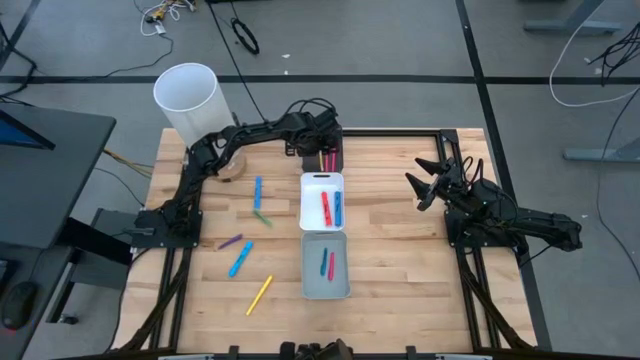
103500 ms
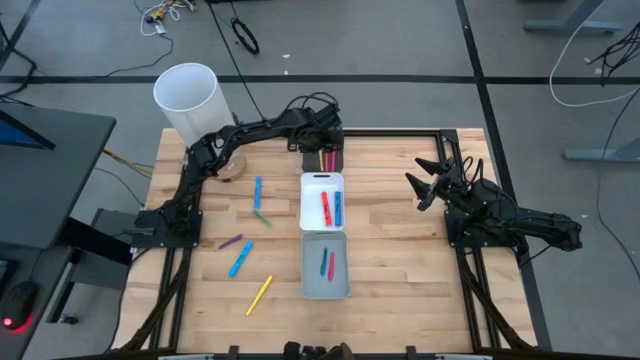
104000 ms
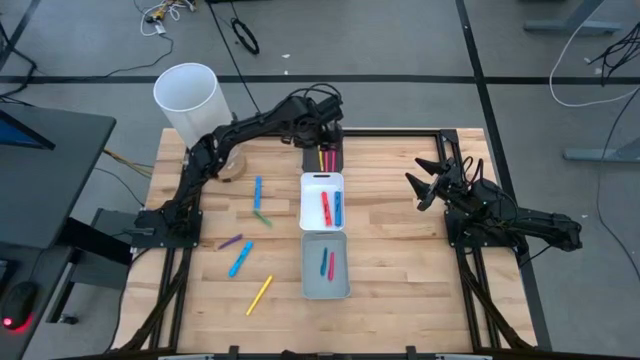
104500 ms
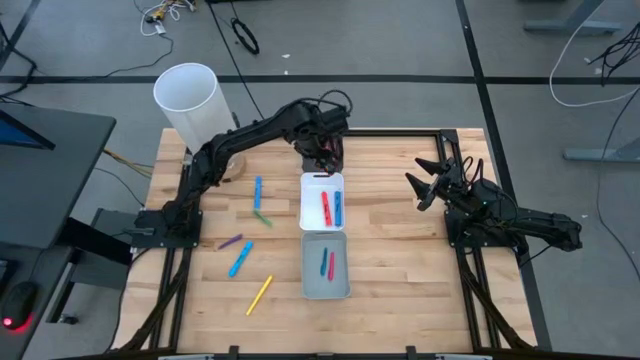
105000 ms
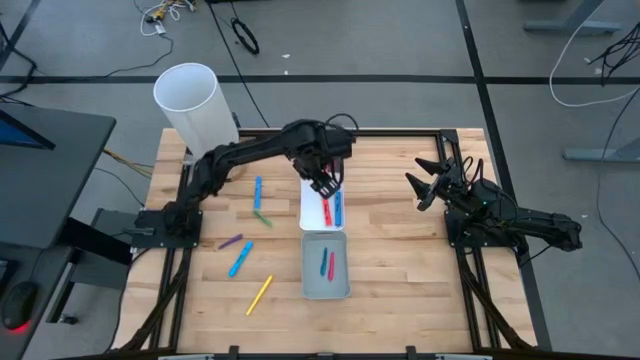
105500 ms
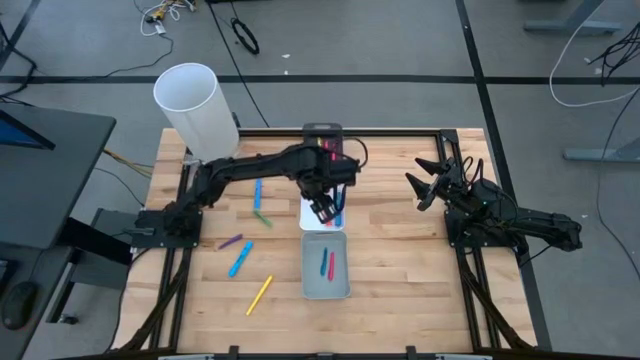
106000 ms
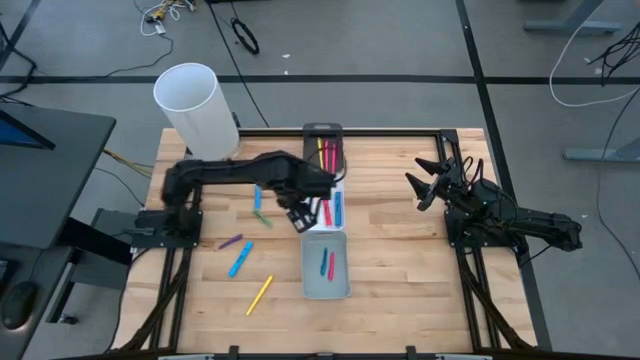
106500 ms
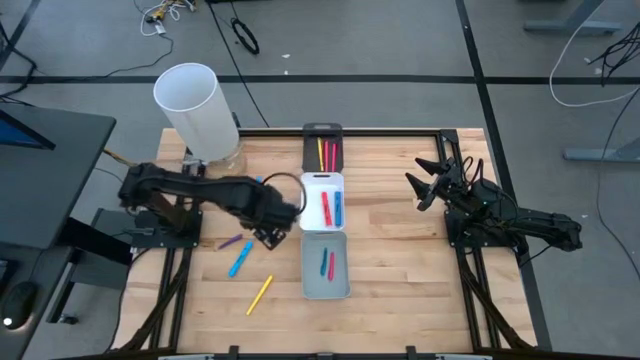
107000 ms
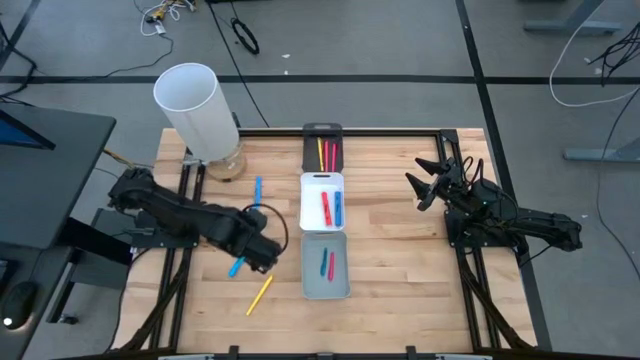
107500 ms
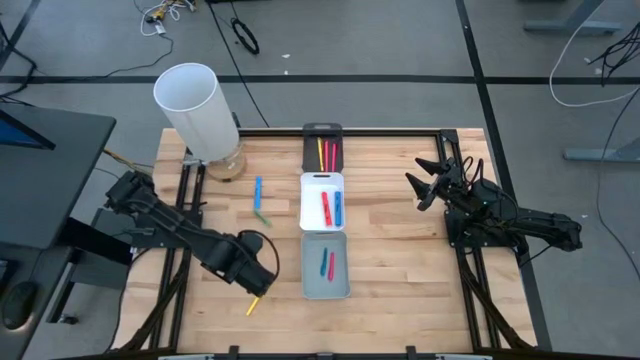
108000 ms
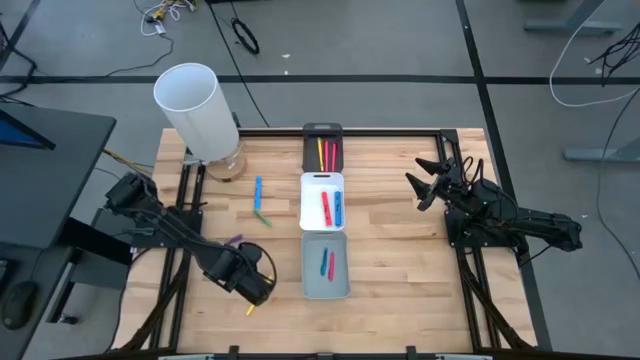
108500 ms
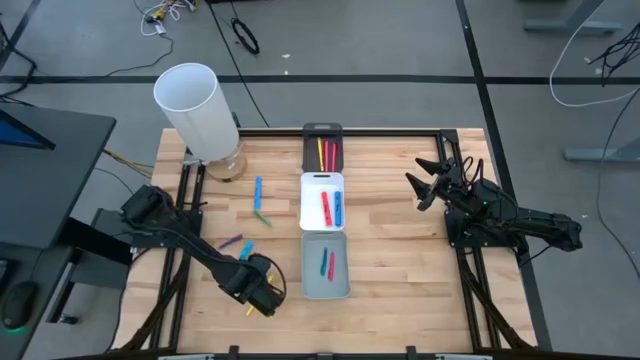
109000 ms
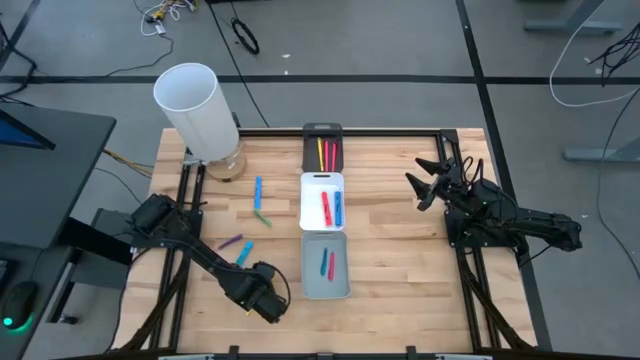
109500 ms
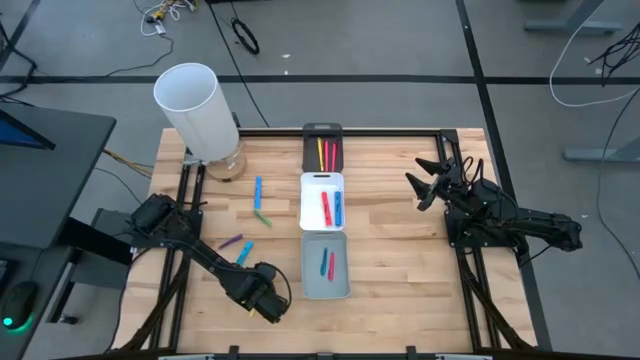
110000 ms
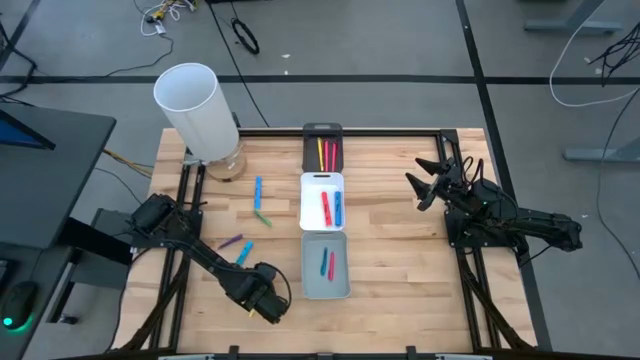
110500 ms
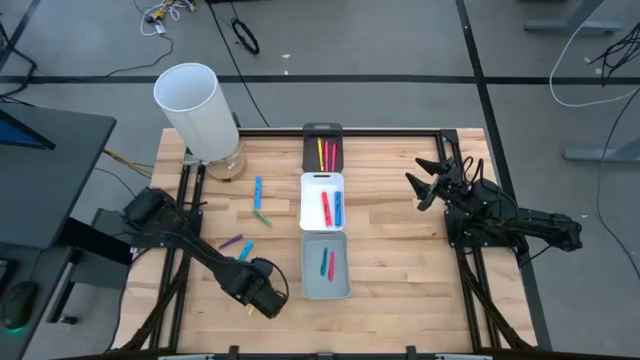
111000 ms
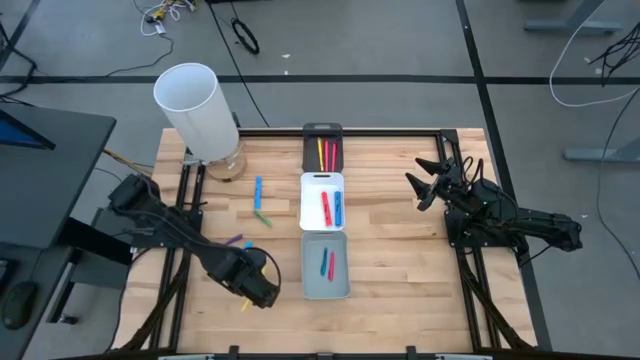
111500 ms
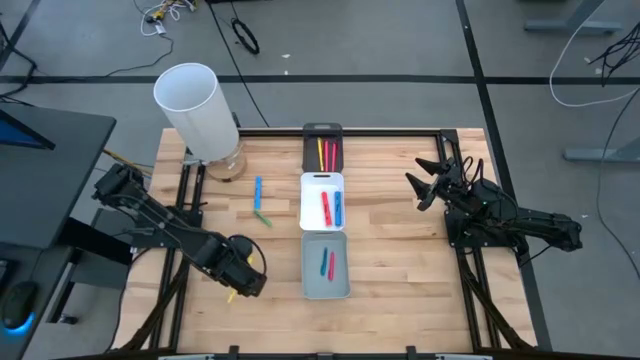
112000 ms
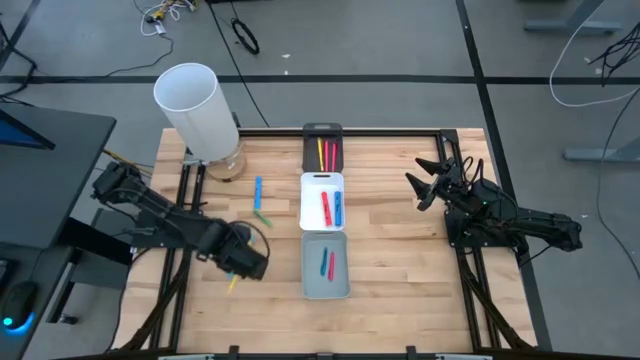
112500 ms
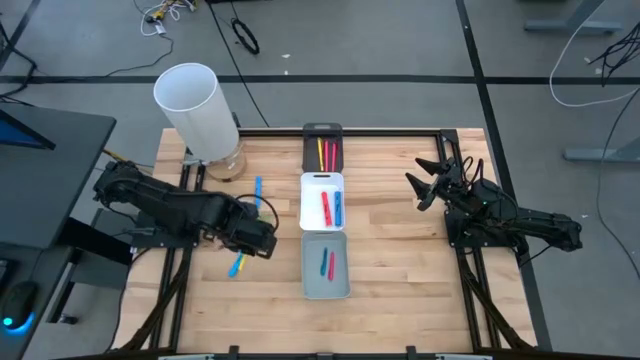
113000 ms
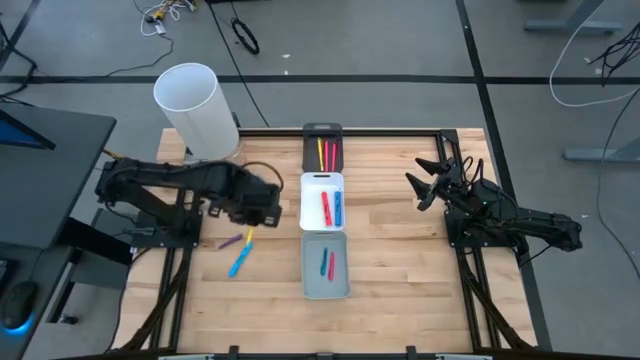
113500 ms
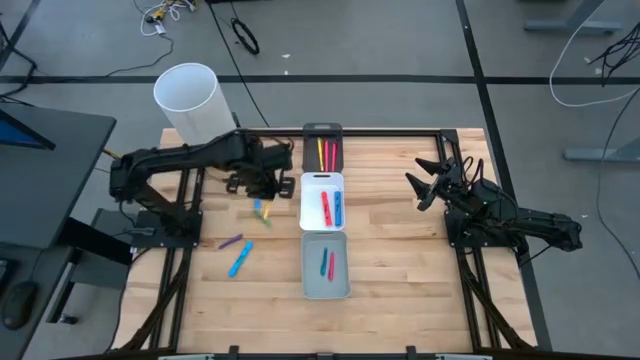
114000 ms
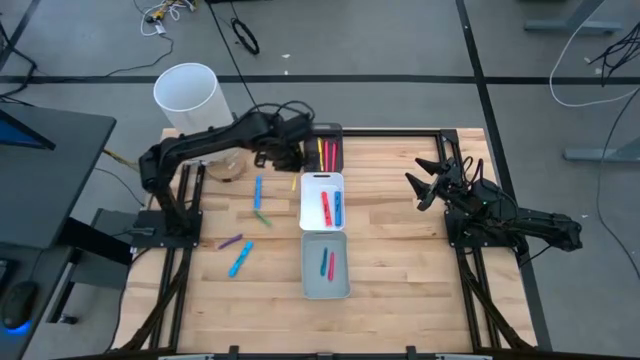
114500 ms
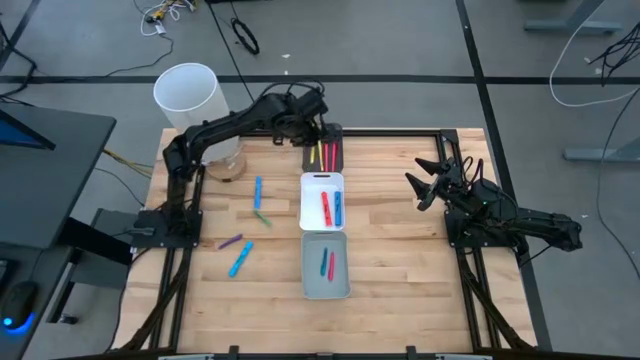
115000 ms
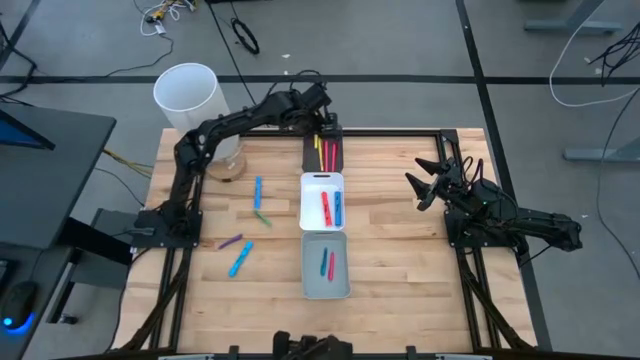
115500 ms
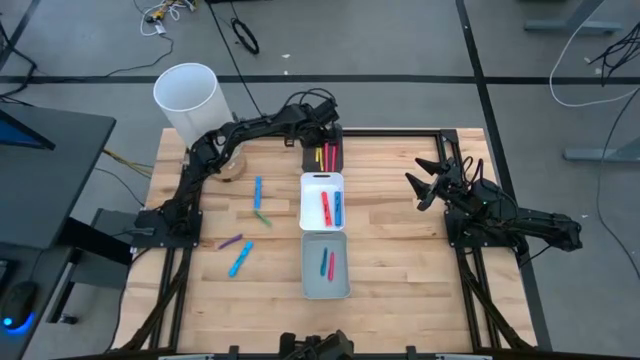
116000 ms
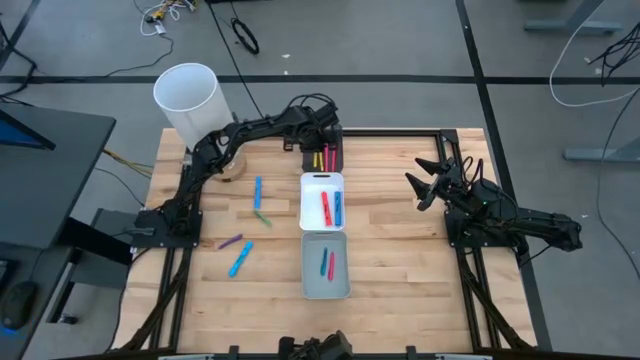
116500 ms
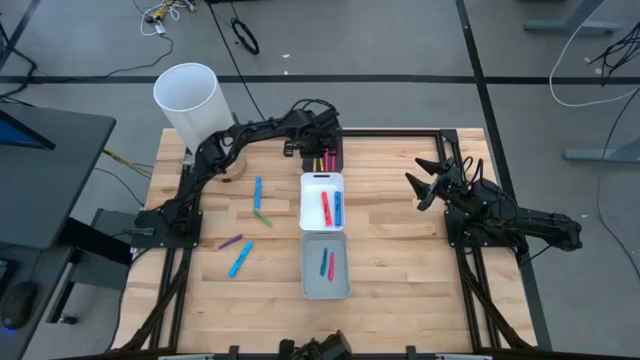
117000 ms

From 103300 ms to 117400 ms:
Task: Pick & Place Markers
Put the yellow pen into the black bin

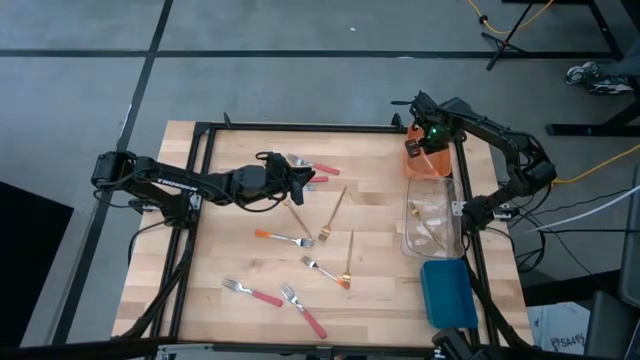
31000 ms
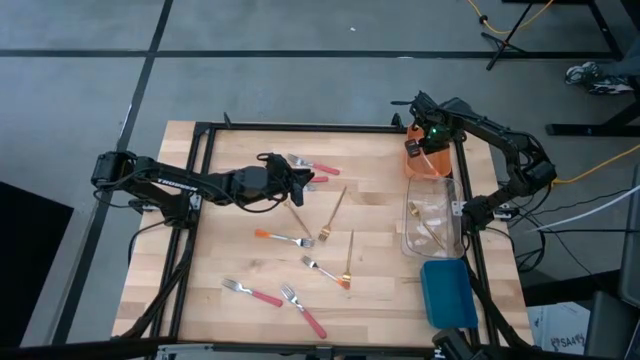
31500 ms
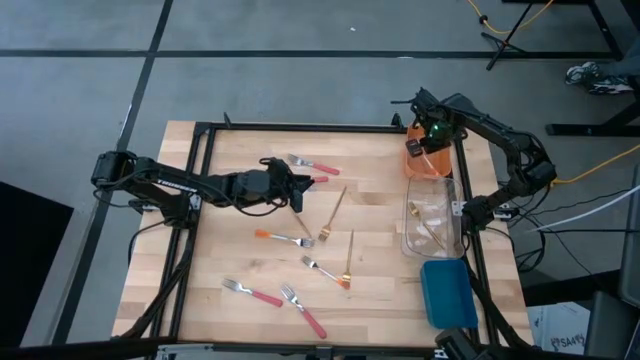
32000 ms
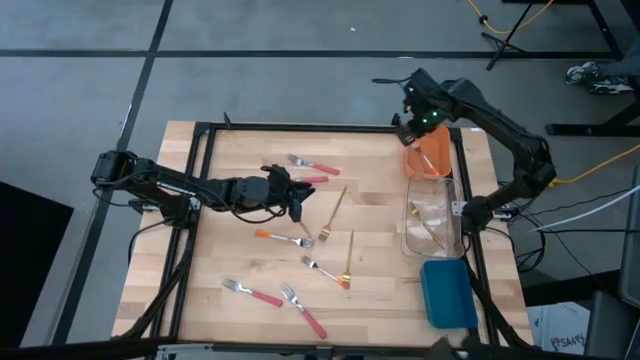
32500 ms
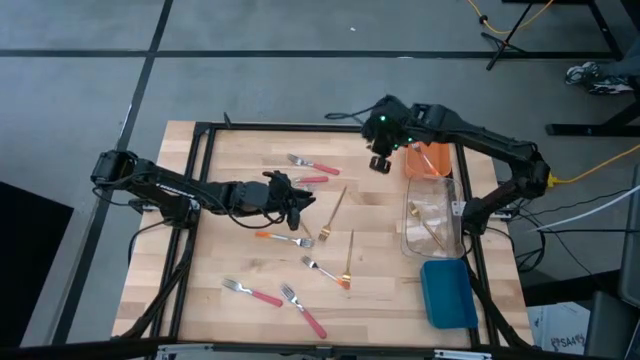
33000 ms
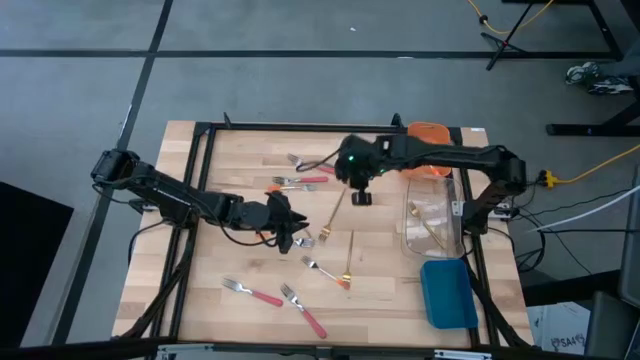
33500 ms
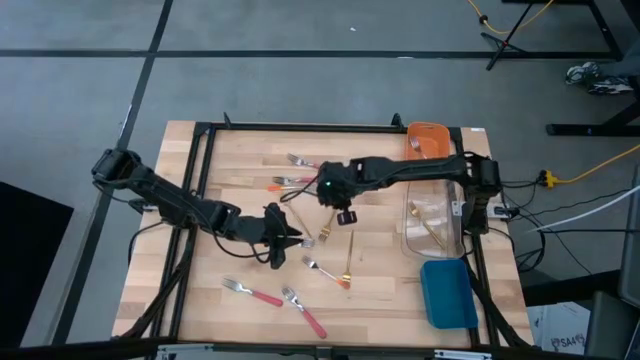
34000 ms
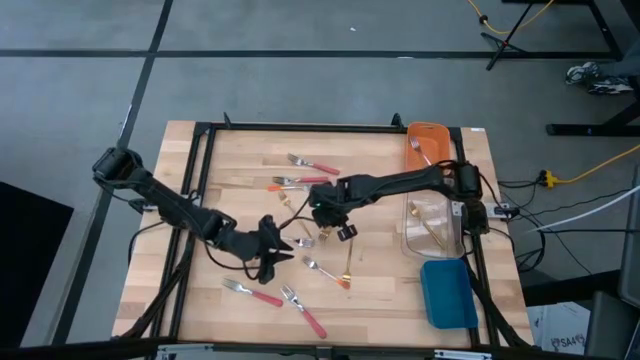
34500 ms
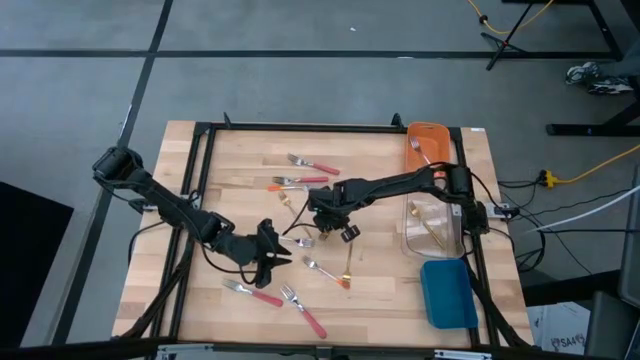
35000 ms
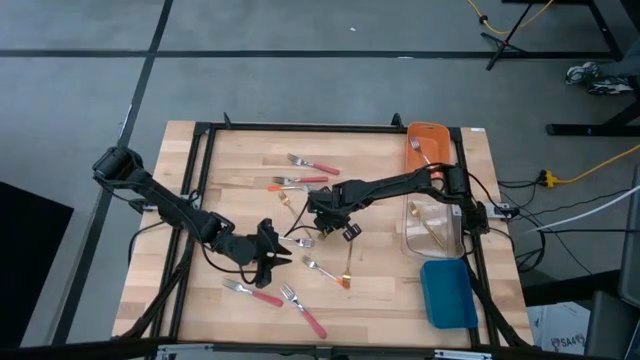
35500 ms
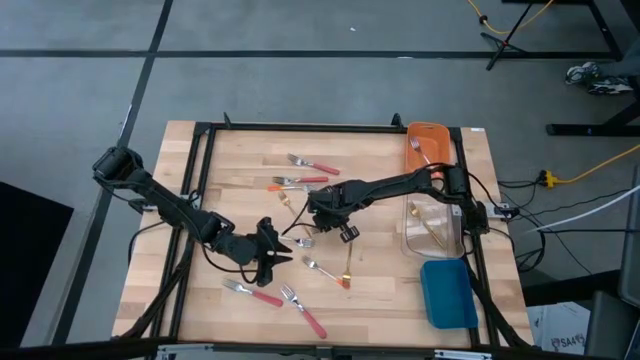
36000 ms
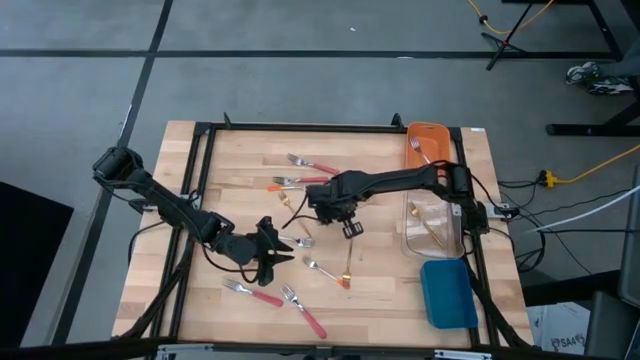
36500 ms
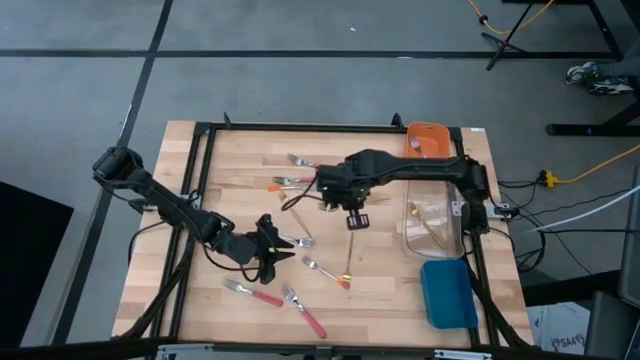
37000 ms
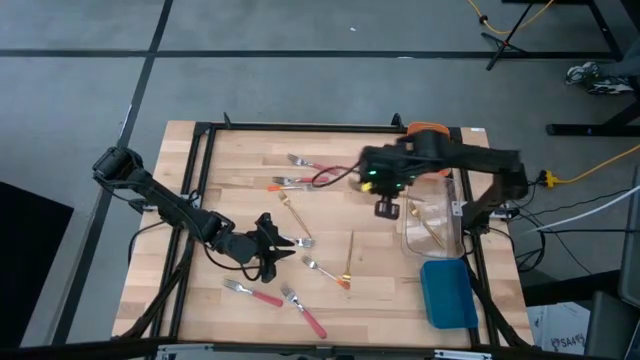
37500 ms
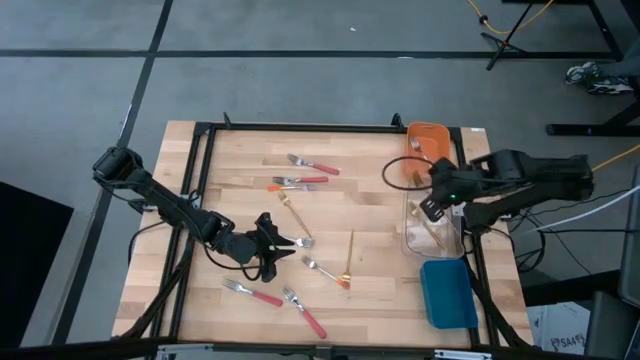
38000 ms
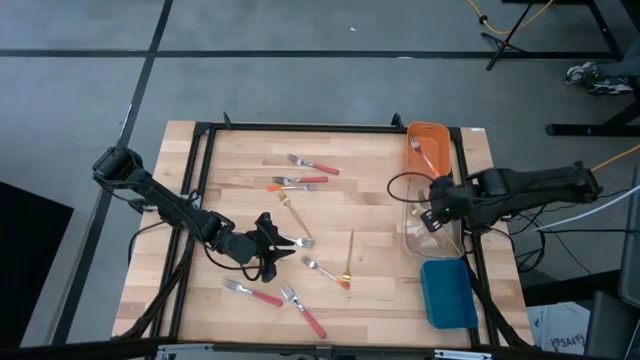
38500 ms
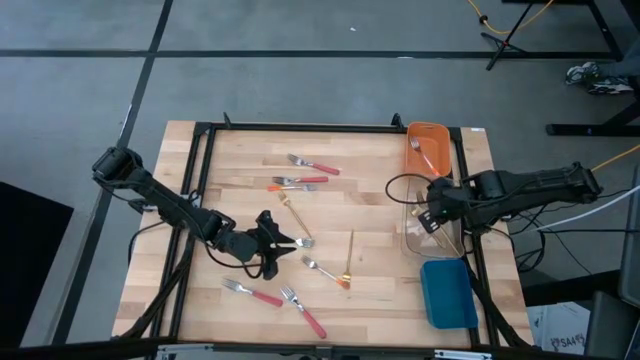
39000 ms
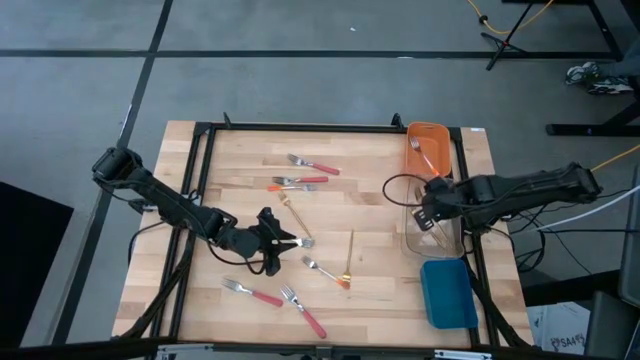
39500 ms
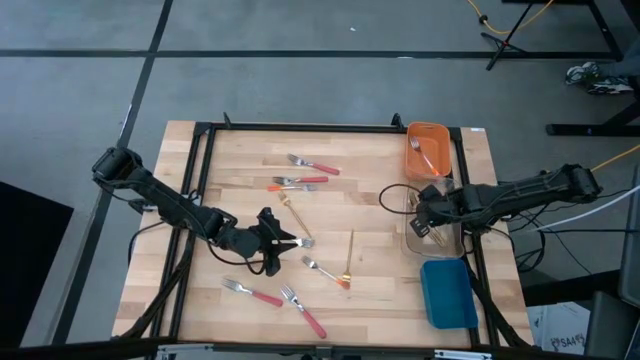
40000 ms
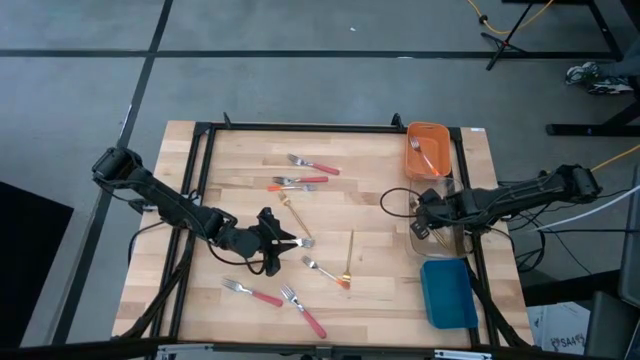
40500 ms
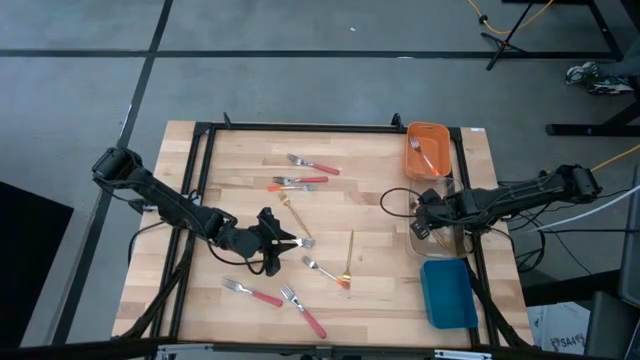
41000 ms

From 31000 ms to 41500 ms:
Task: Sort silverware by color (type)
Put the gold fork into the transparent bin
